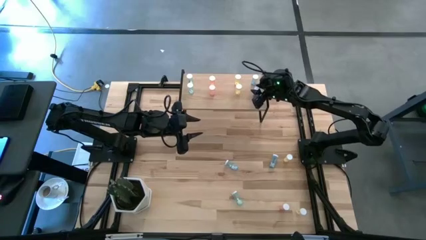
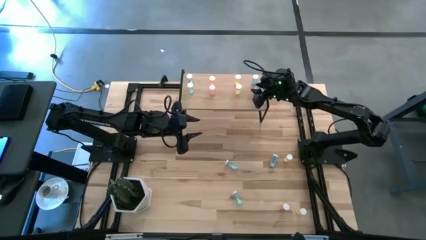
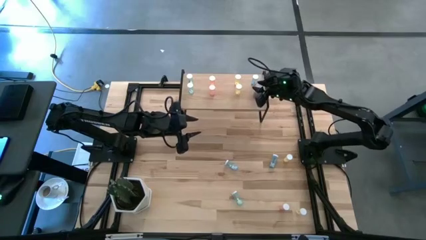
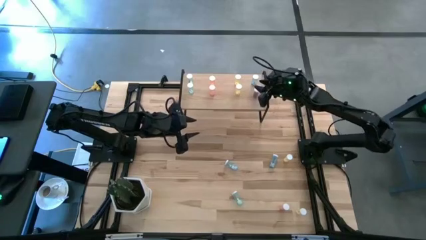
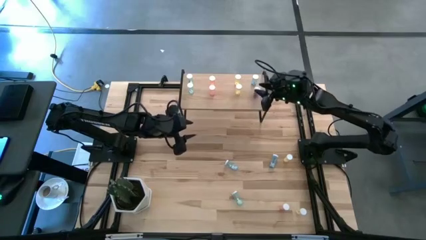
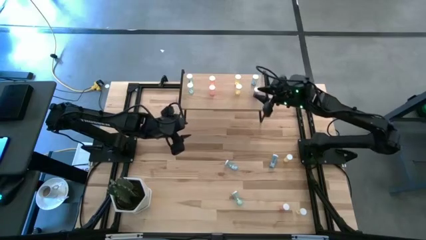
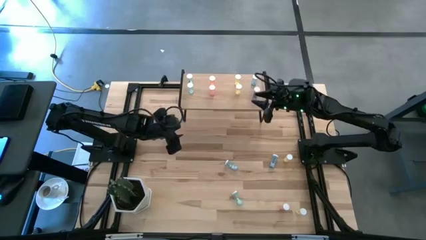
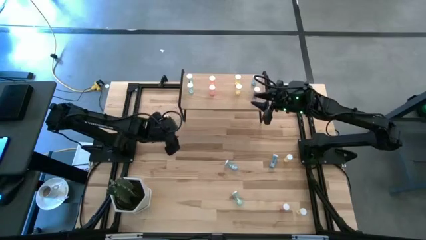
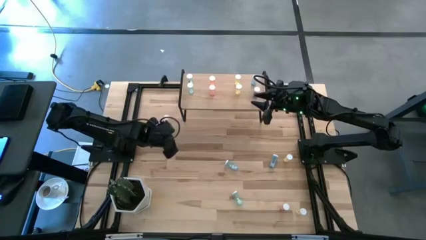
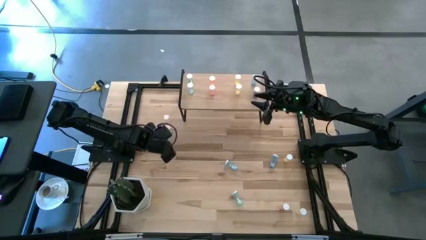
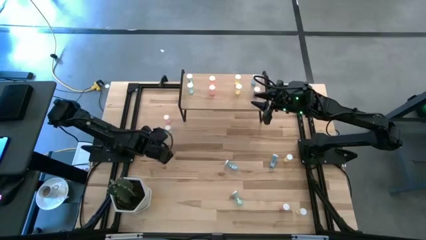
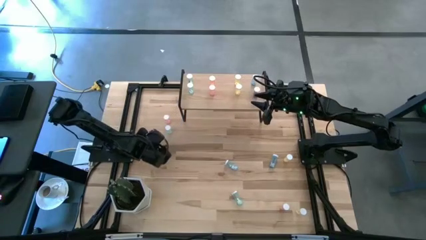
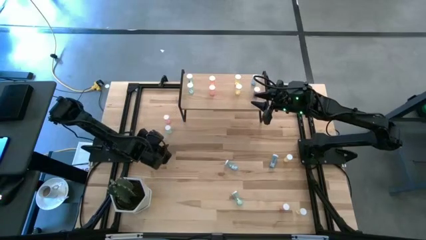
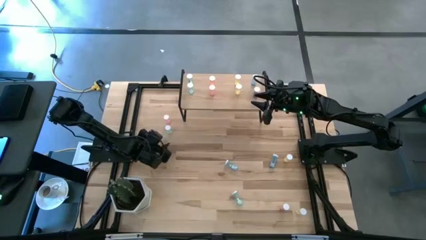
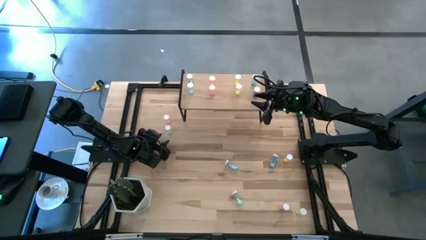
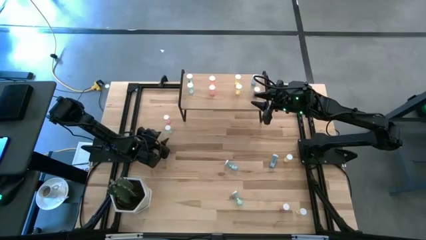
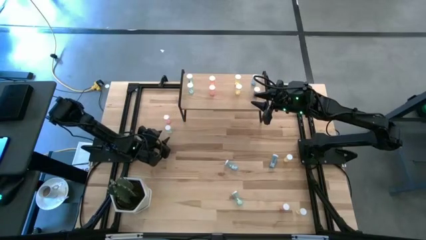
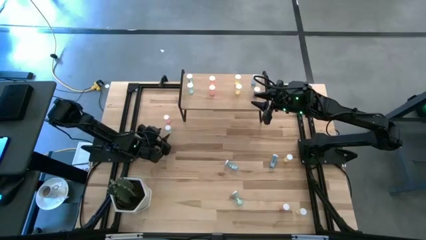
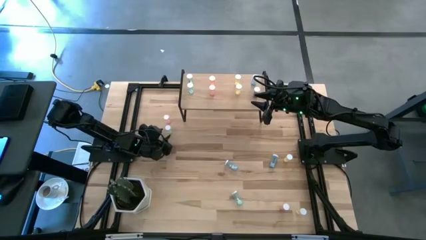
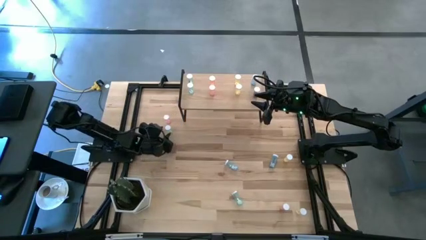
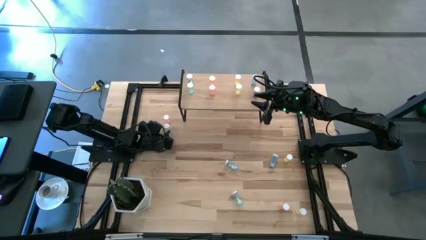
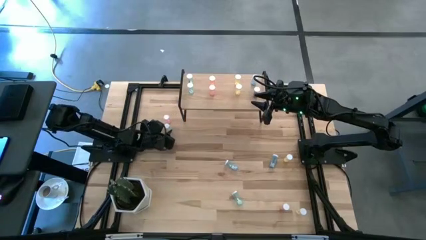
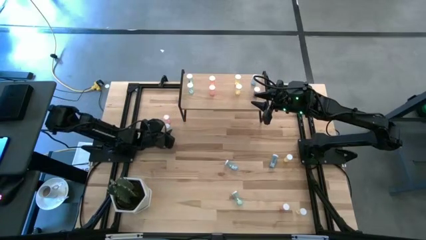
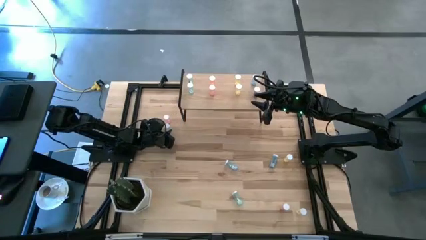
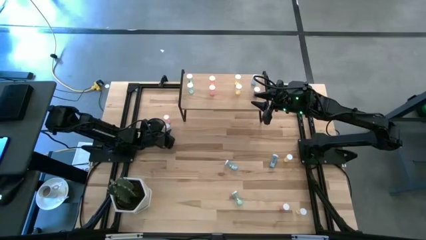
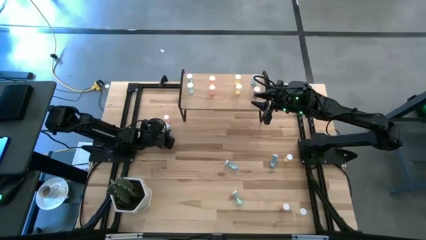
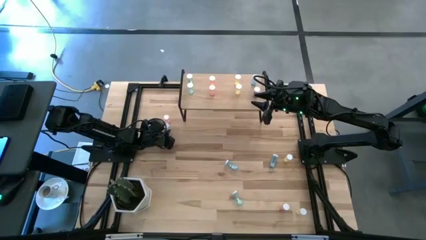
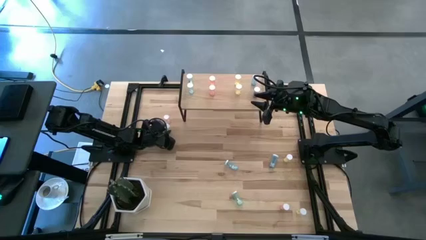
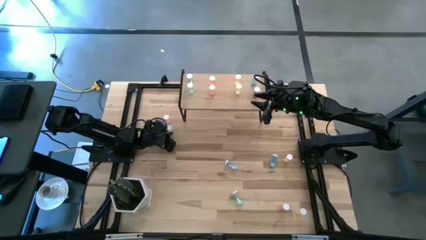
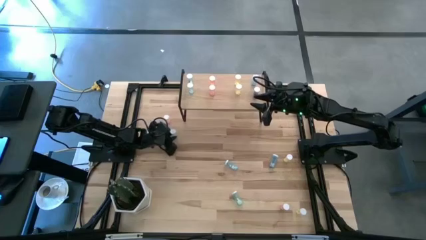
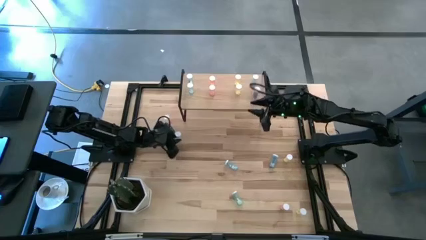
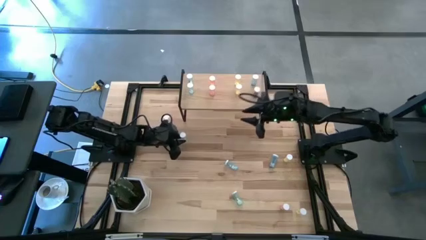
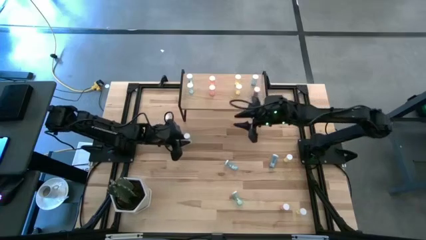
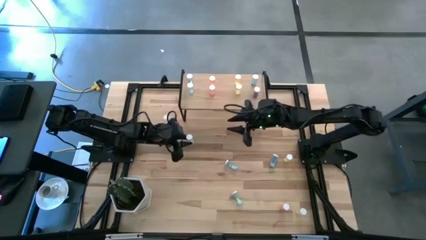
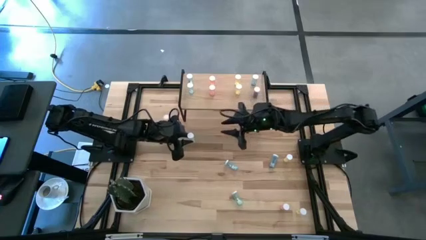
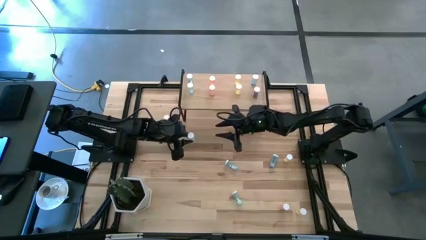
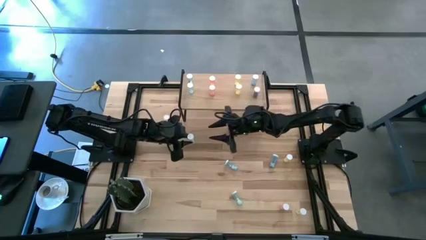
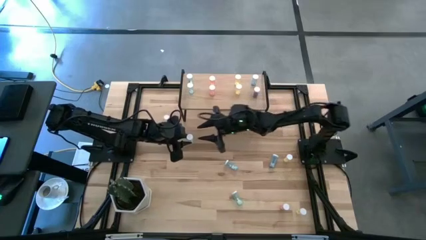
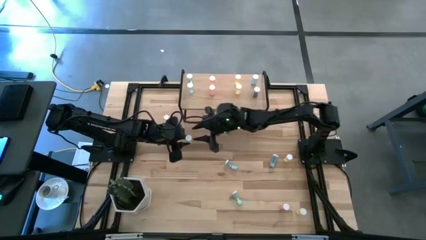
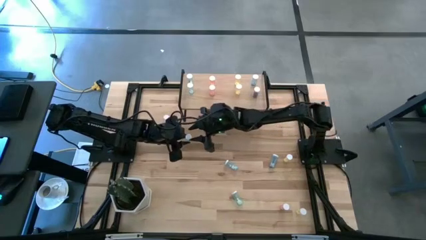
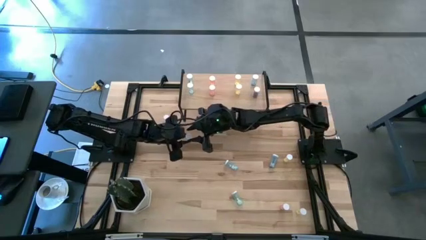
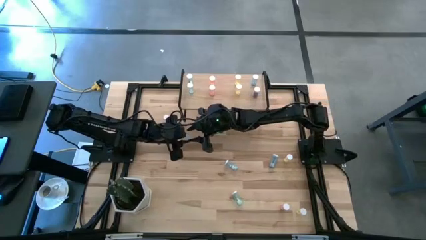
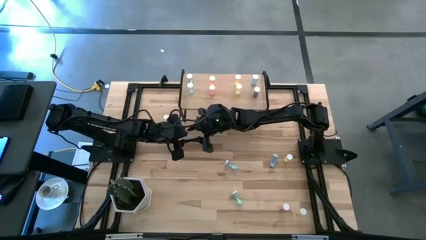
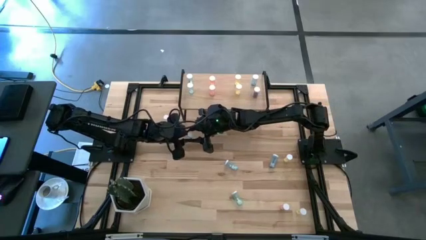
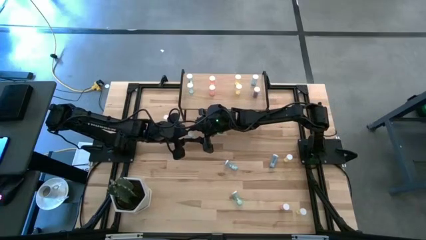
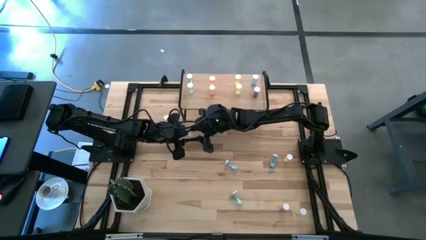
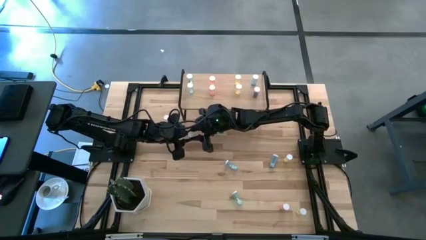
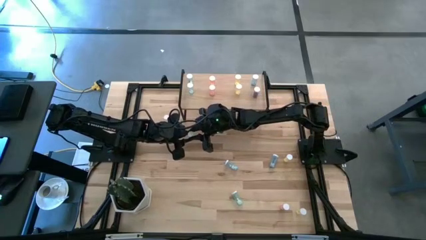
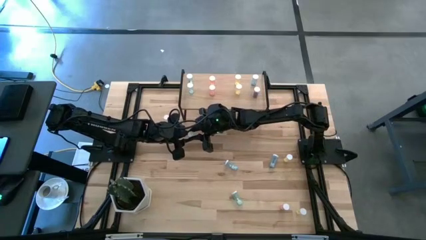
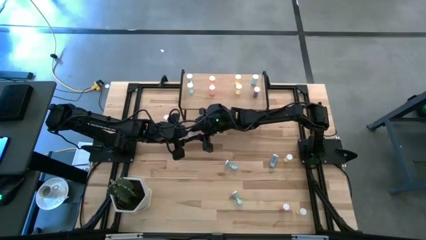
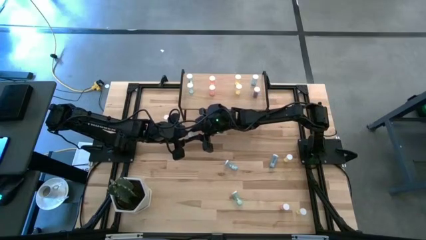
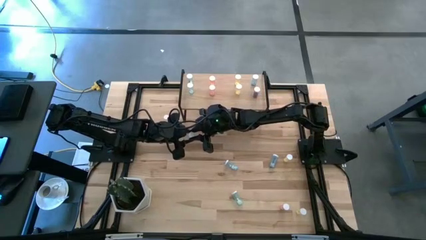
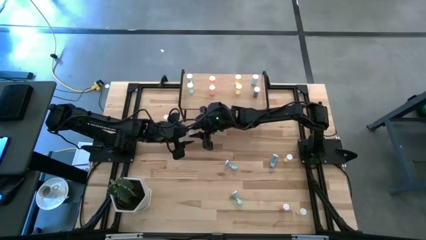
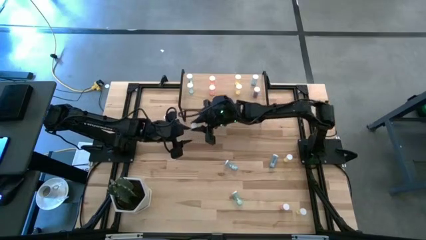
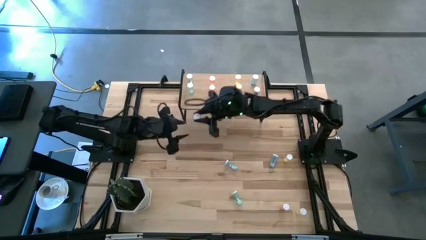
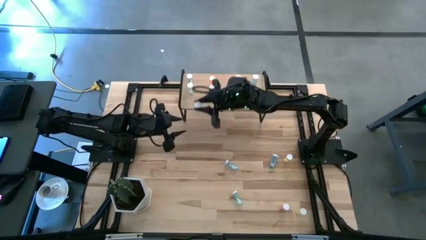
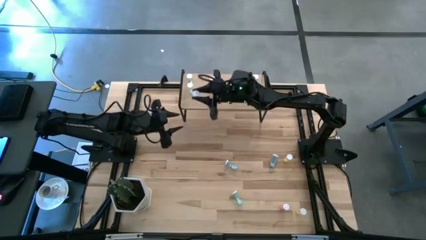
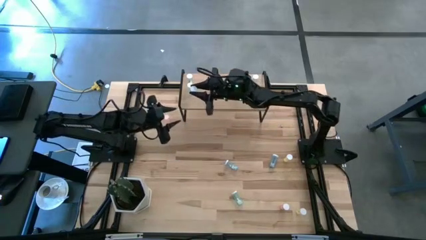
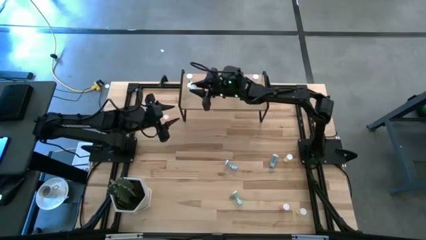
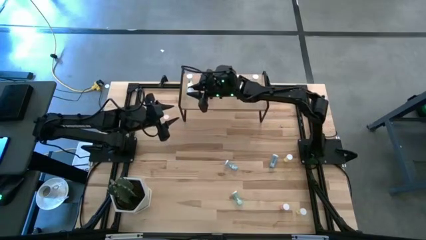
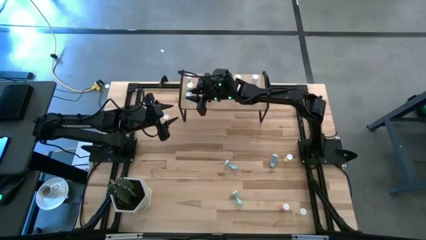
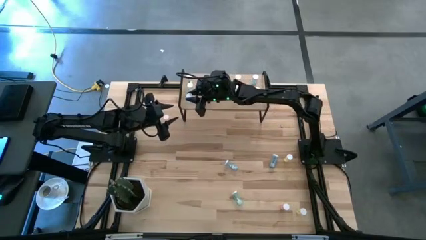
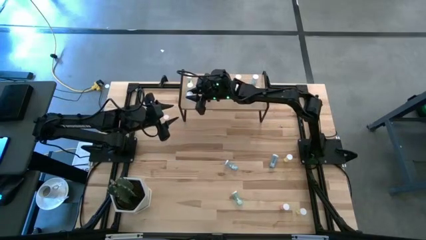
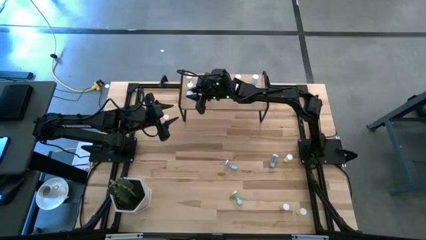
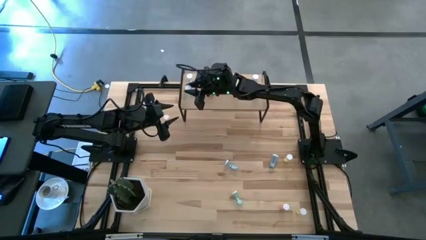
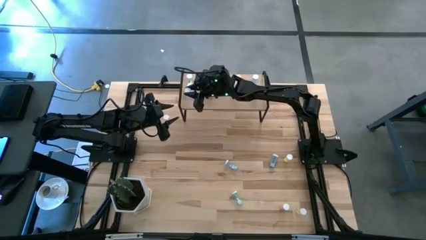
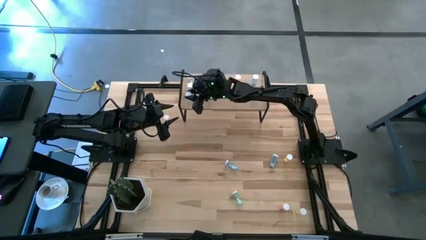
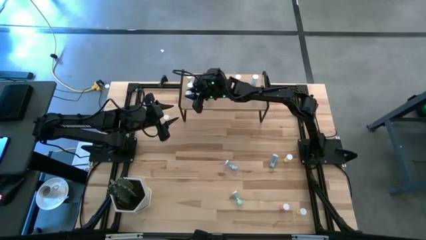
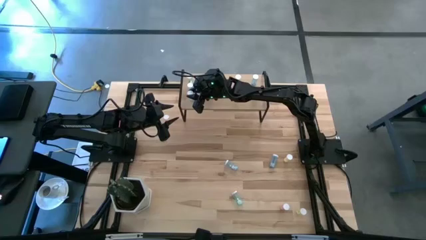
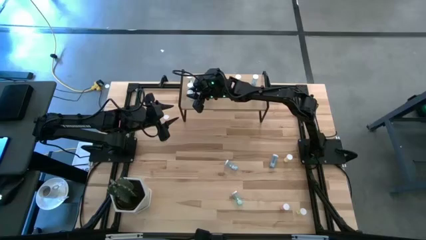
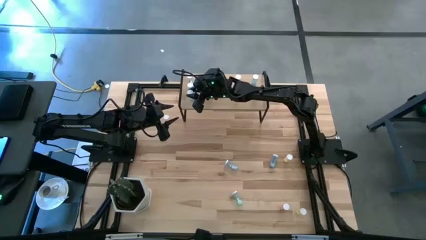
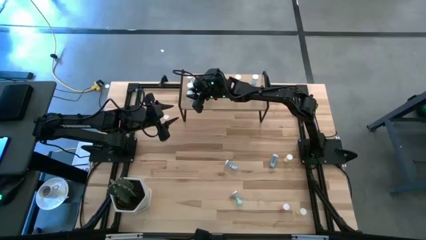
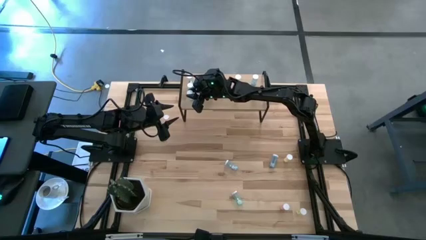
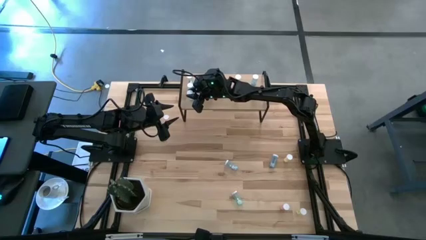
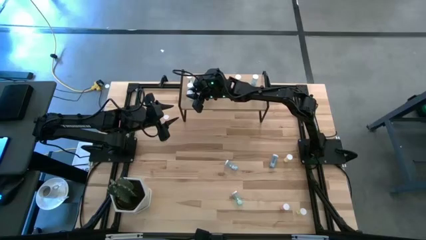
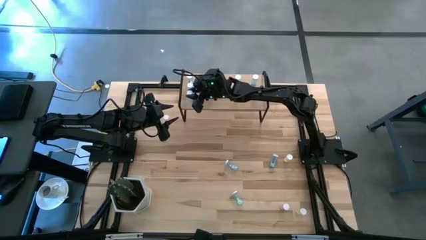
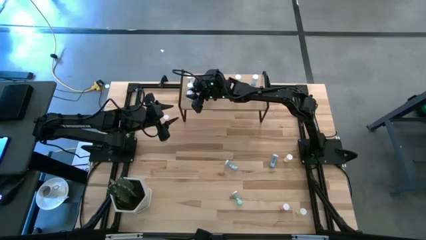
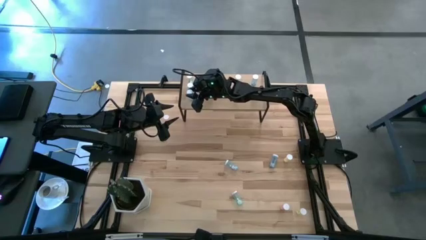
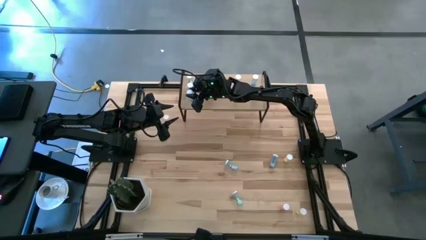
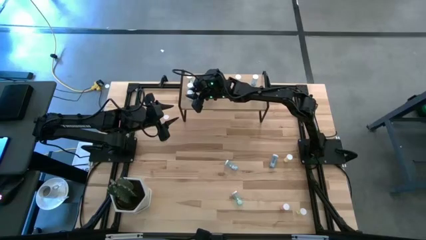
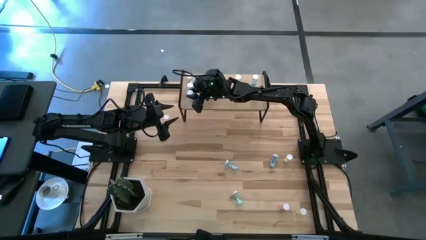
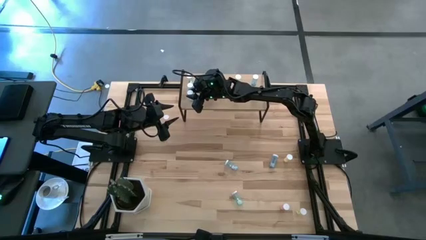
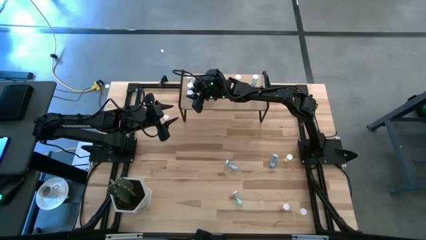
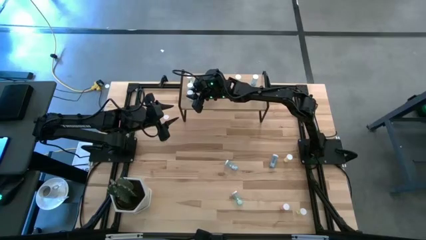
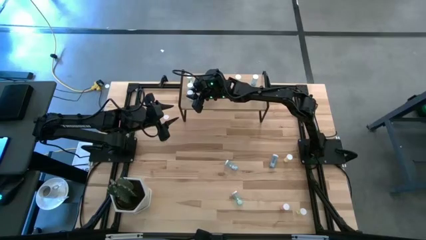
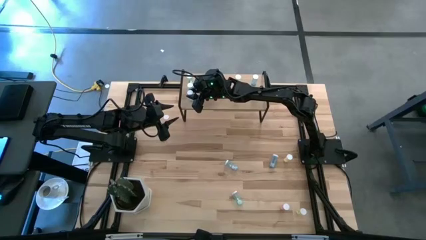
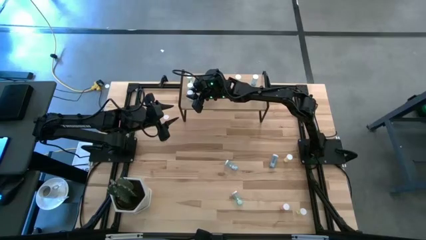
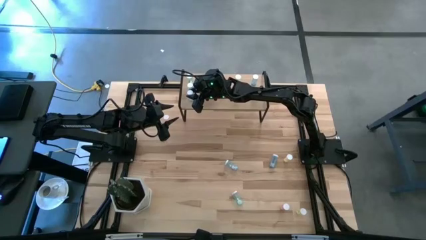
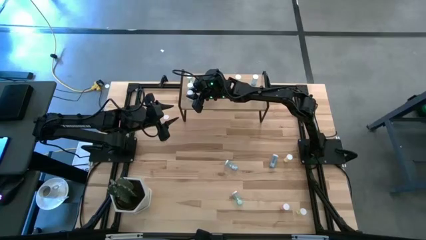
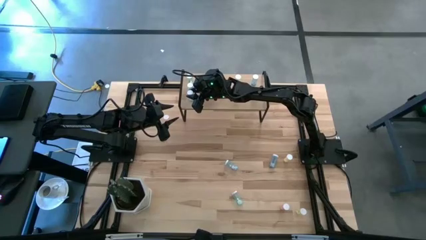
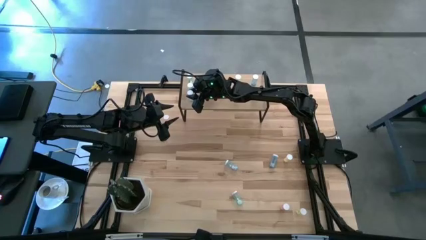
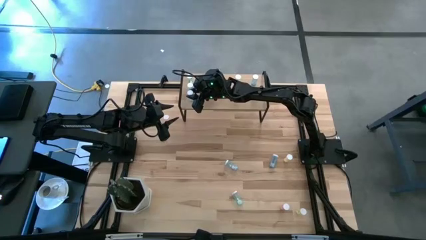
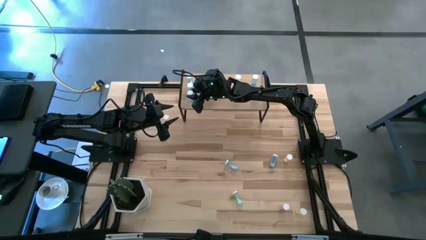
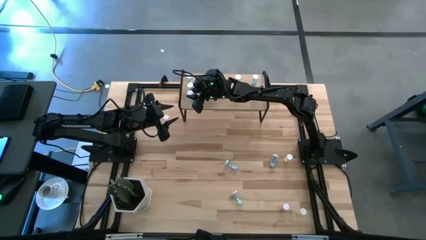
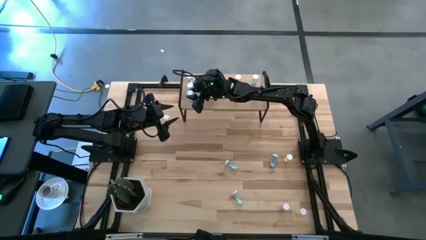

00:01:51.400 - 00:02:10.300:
Task: Pick and place medicine bottles onto shelf by color
Align the green pill bottle with the green bottle on the shelf
